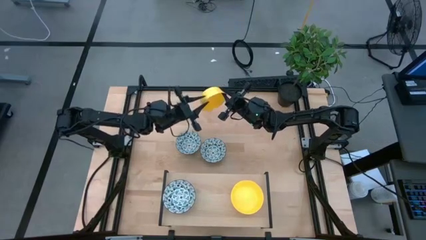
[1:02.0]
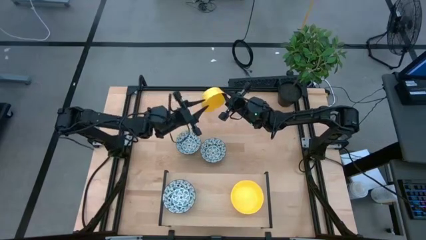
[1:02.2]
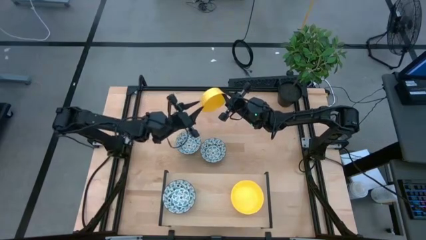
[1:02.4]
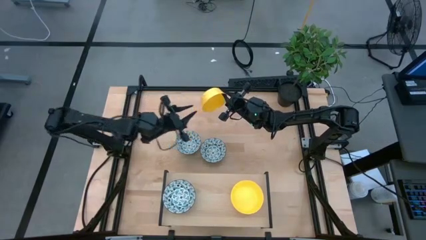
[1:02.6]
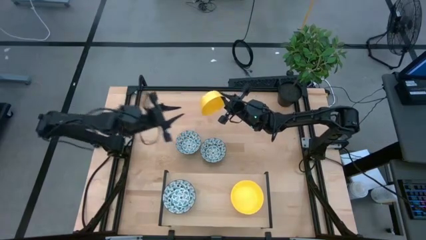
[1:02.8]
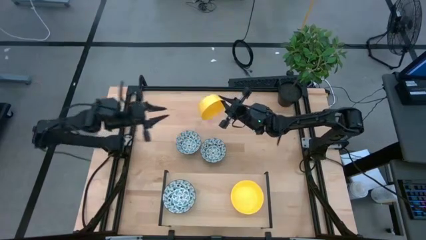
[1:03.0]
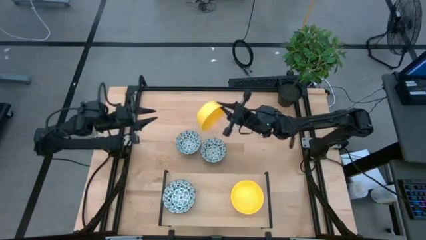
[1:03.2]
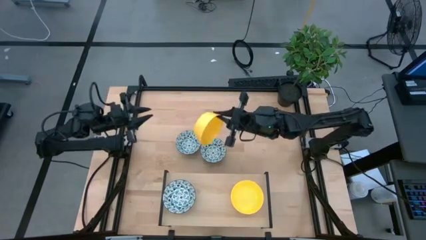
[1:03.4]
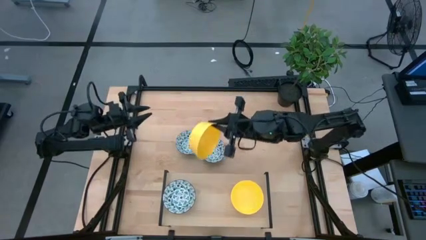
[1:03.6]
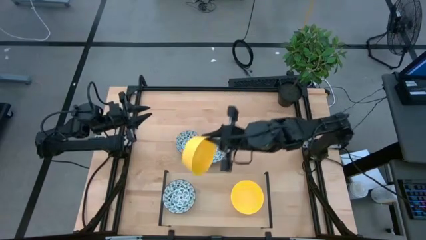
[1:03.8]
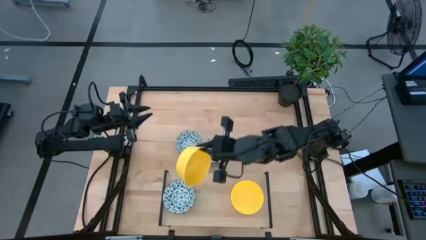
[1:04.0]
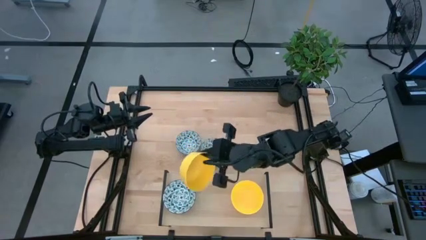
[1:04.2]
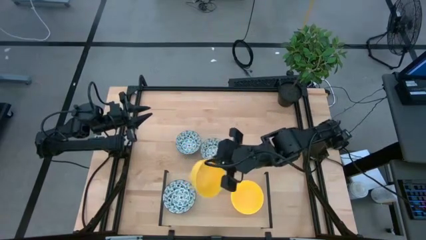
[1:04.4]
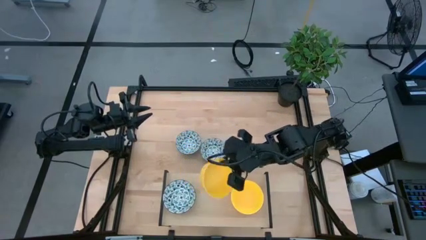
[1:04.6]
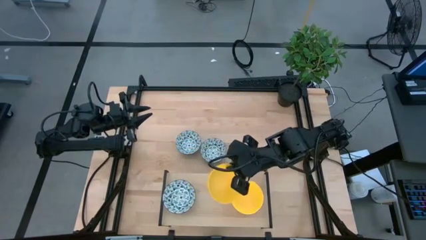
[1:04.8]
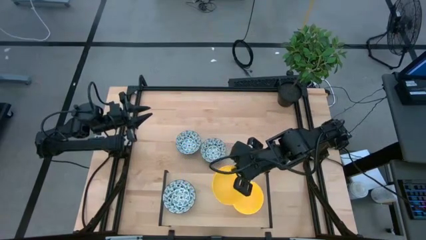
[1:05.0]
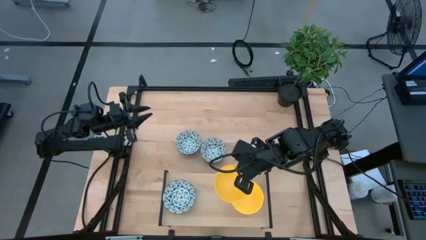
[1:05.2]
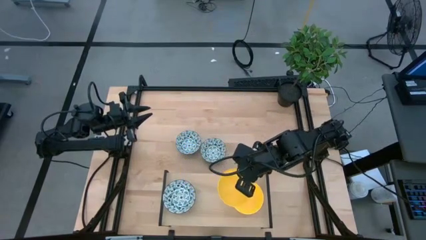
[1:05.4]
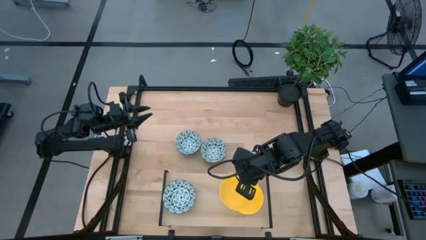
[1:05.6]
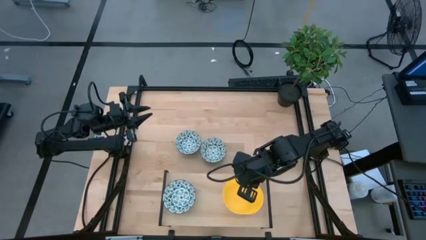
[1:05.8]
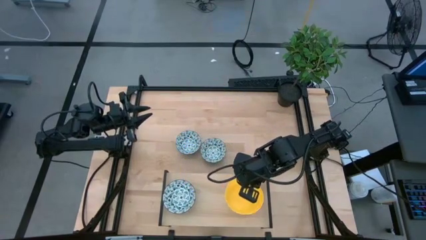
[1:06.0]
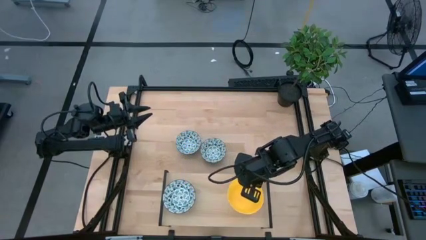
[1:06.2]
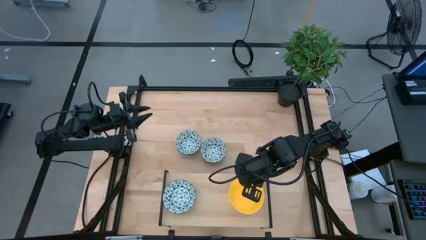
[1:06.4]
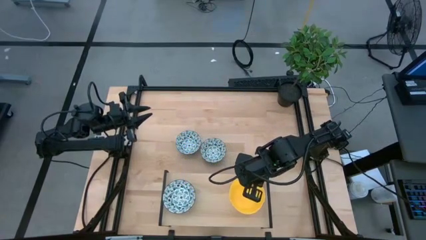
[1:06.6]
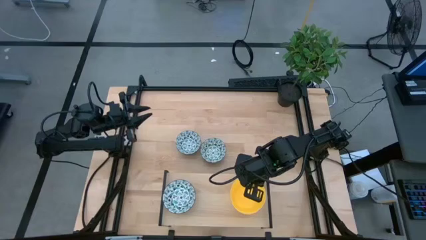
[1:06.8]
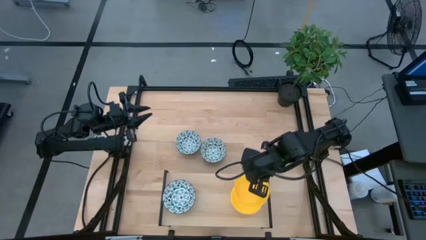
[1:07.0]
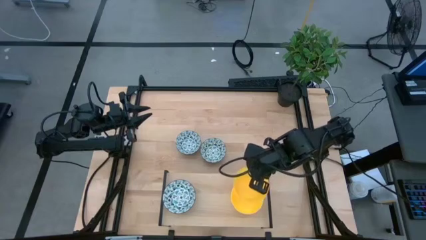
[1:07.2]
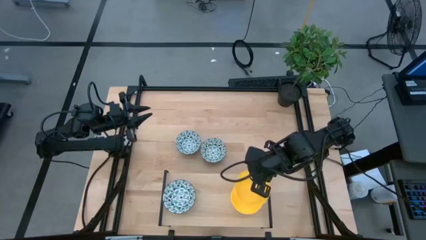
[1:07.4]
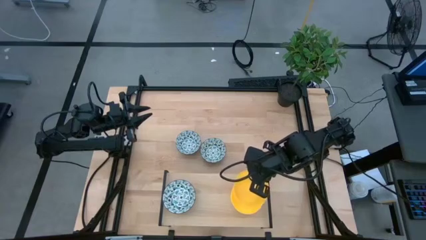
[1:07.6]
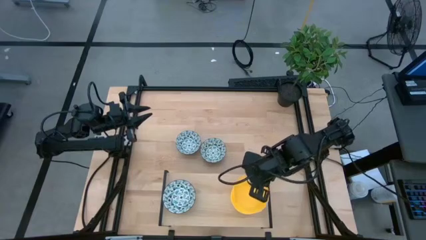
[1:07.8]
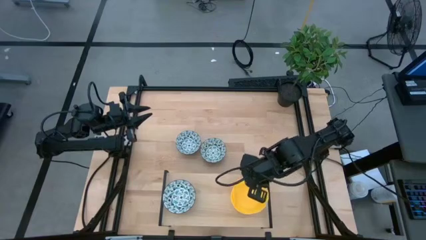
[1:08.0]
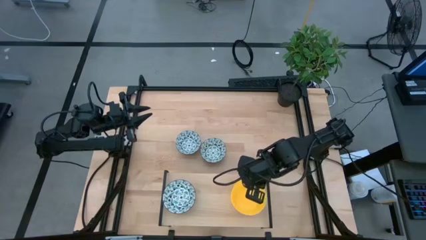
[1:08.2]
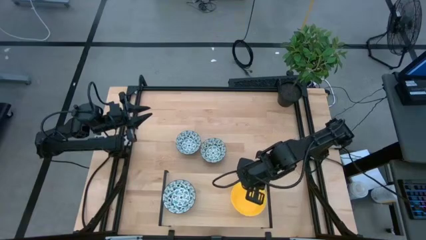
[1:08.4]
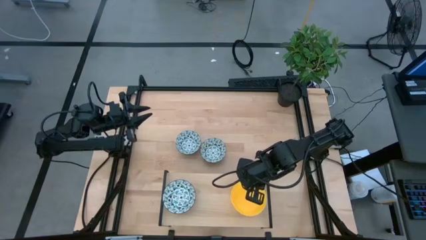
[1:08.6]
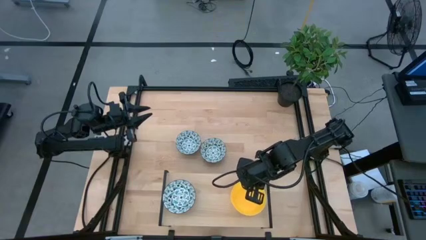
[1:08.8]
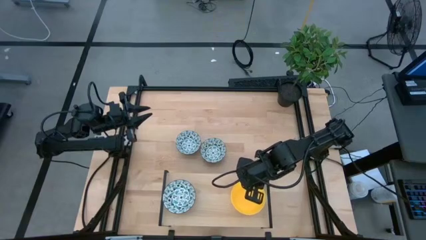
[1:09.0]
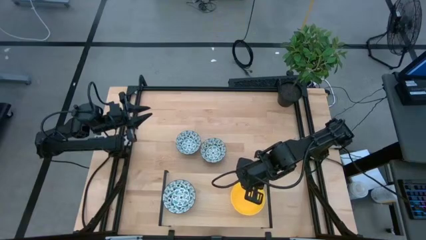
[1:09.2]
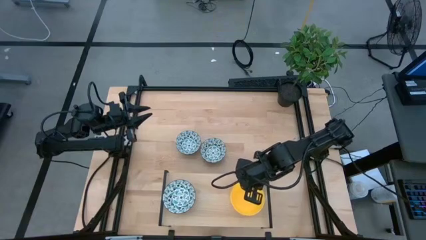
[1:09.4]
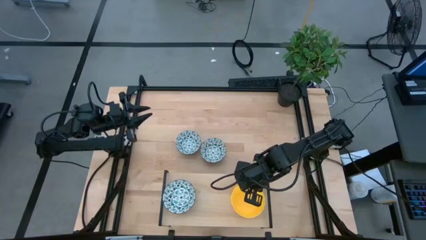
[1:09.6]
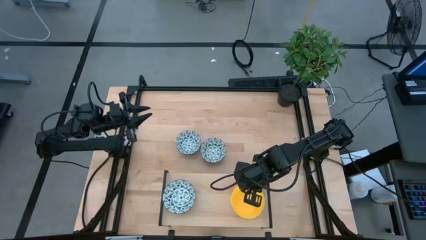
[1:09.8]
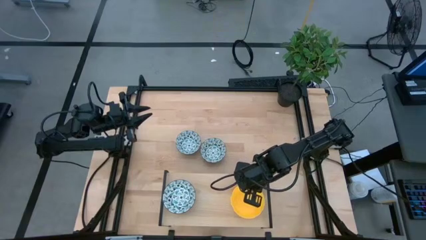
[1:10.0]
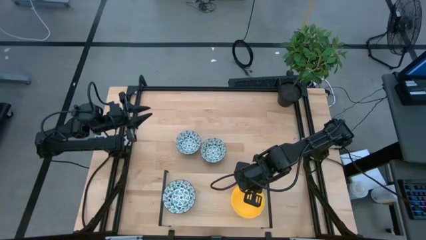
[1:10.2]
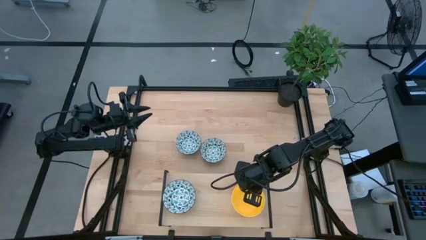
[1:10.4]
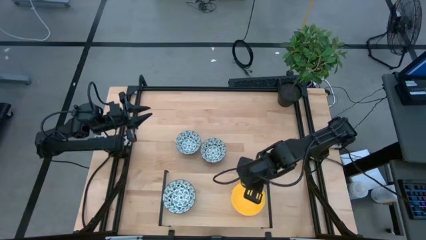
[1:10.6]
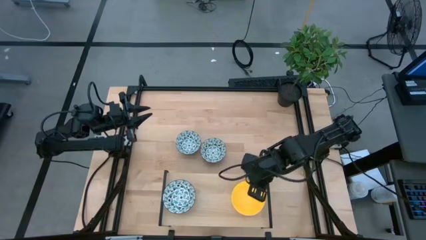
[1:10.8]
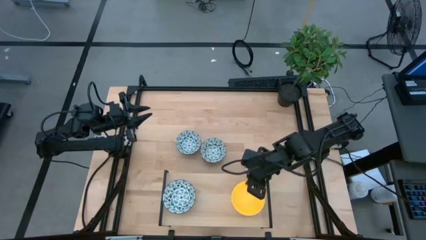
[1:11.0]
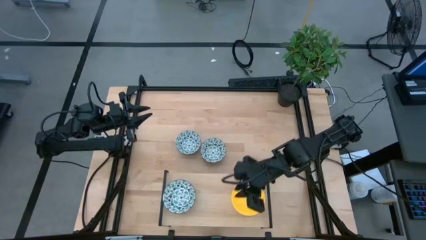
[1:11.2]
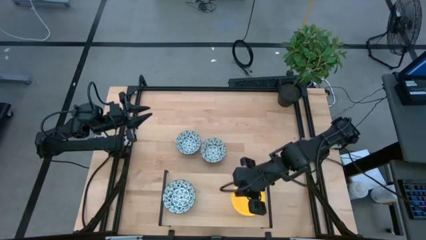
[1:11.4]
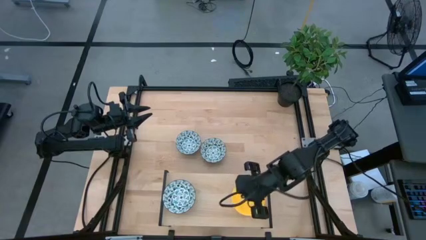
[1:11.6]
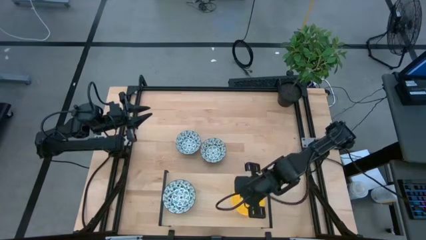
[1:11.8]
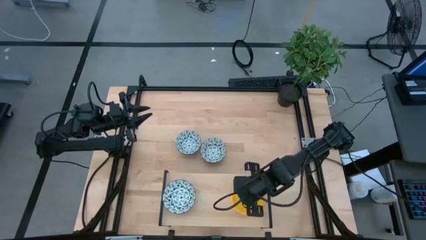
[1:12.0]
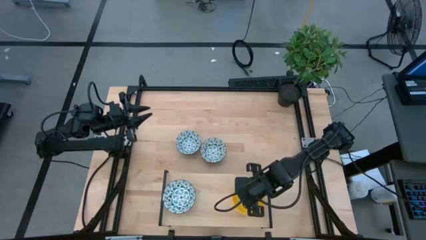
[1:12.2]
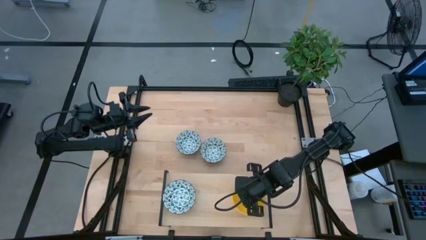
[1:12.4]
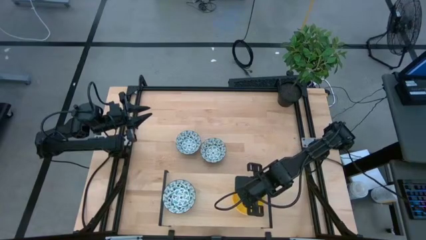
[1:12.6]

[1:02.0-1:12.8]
Task: Pick & Place Mini bowls
Stack the yellow bowl on the yellow bowl on the shelf
